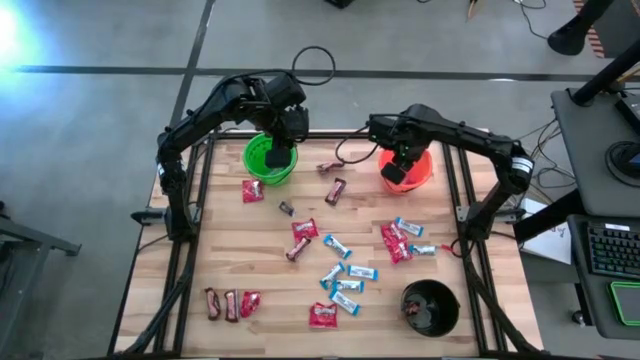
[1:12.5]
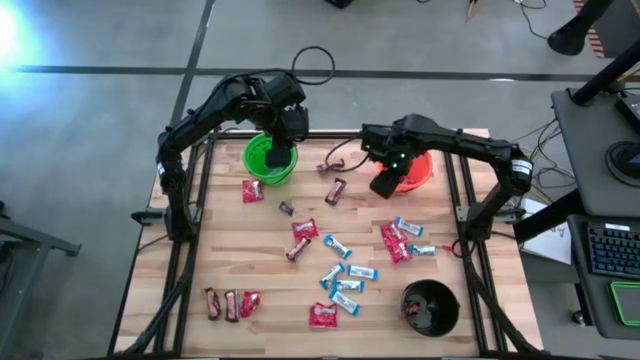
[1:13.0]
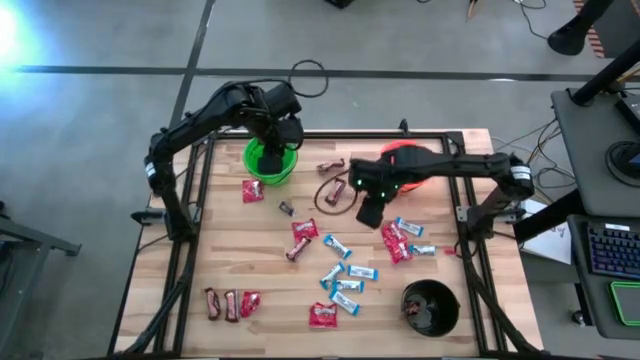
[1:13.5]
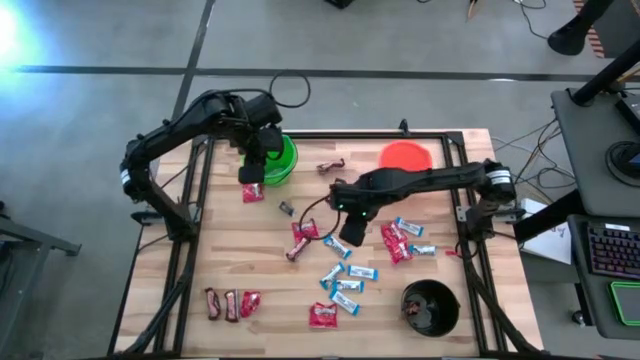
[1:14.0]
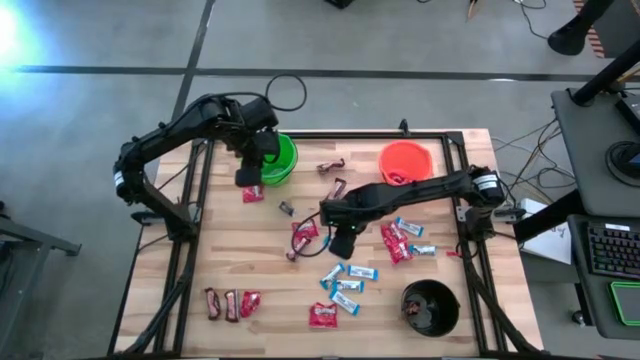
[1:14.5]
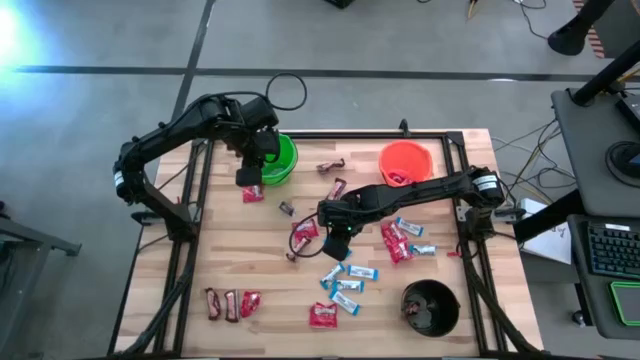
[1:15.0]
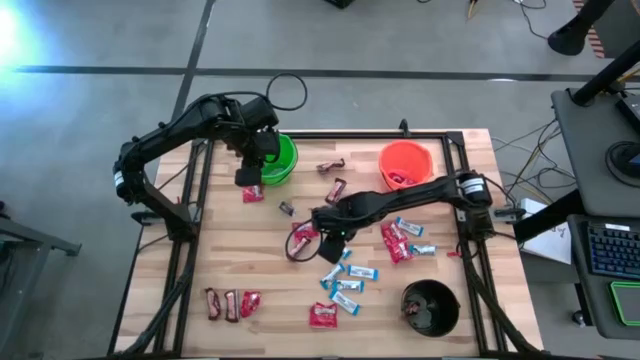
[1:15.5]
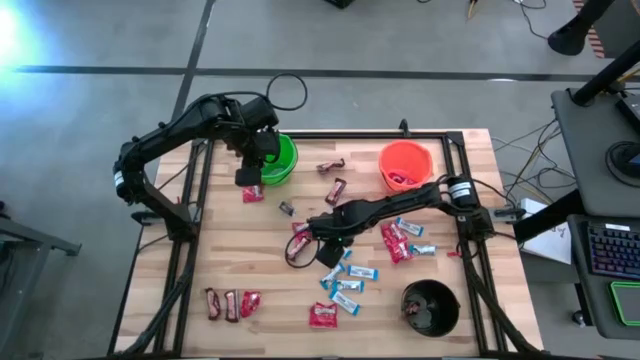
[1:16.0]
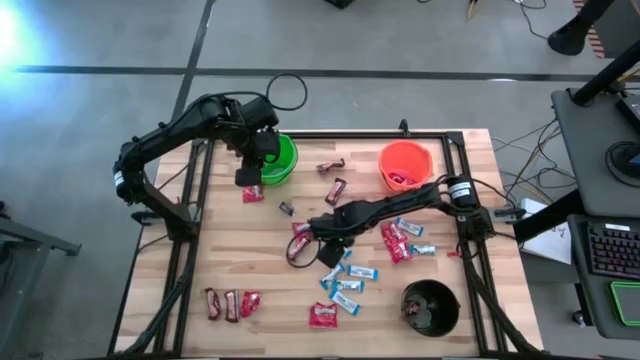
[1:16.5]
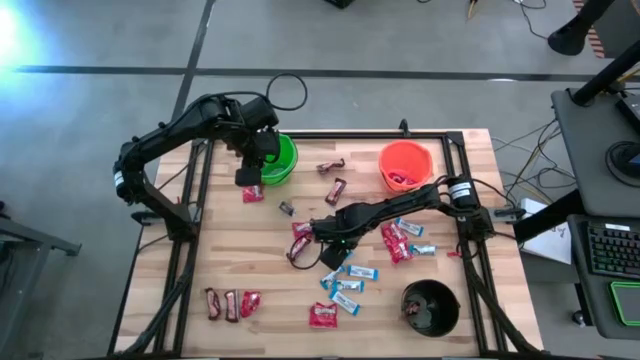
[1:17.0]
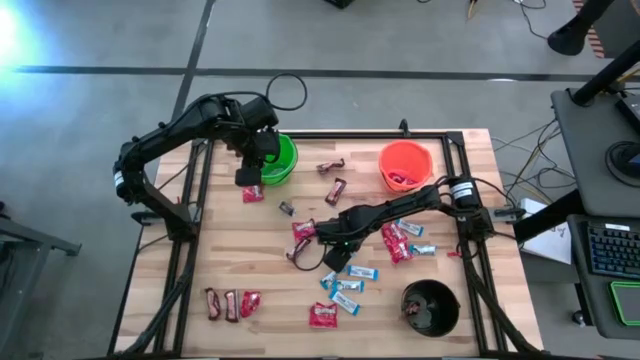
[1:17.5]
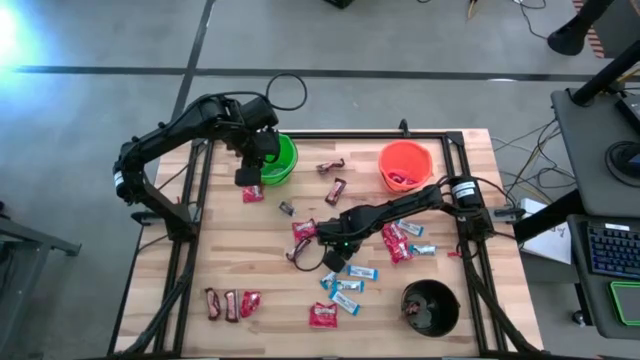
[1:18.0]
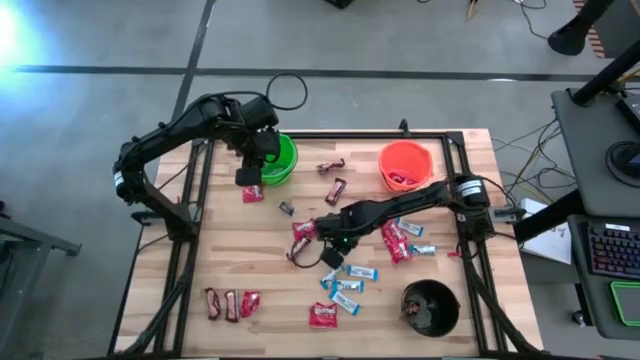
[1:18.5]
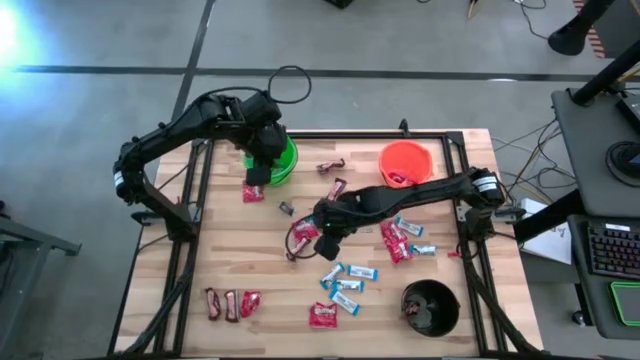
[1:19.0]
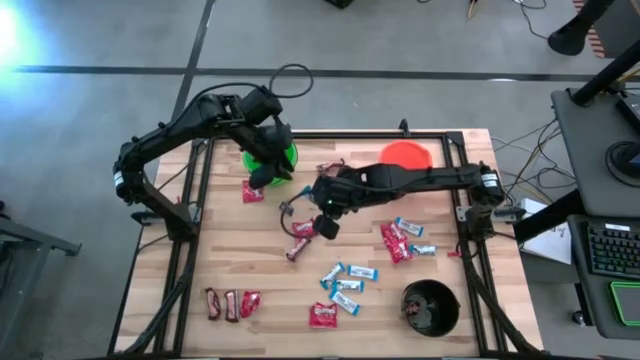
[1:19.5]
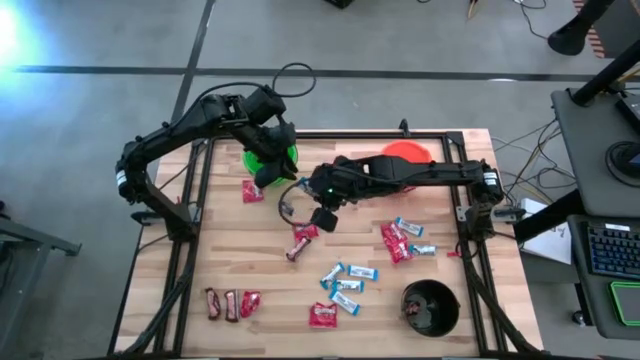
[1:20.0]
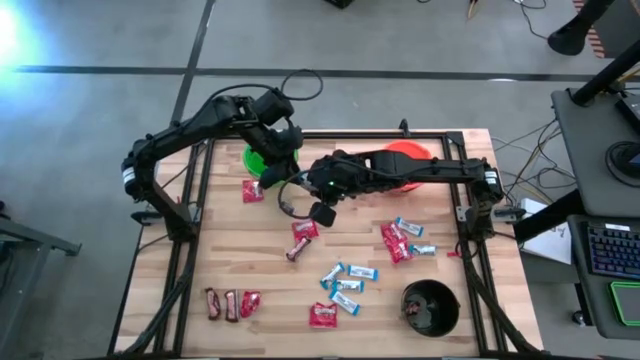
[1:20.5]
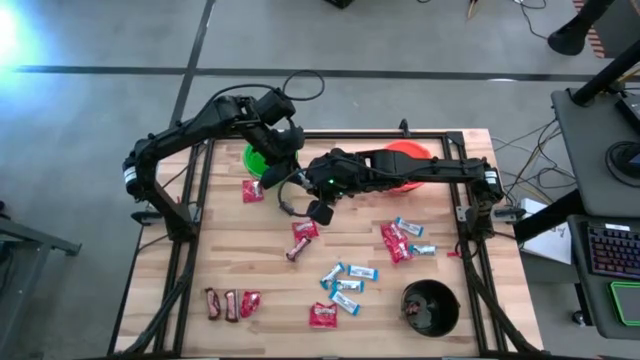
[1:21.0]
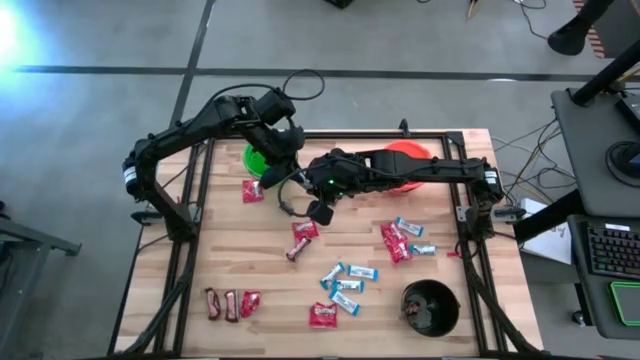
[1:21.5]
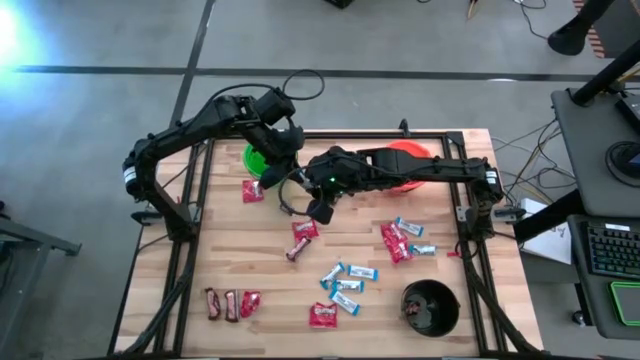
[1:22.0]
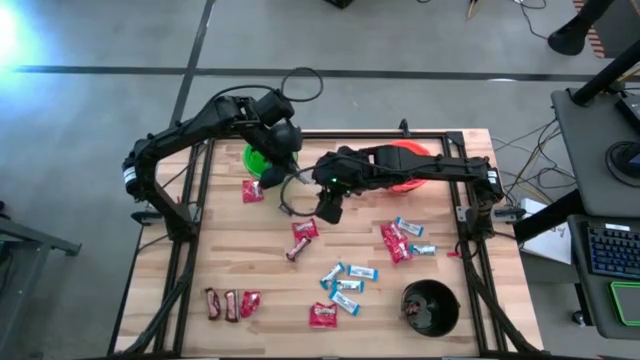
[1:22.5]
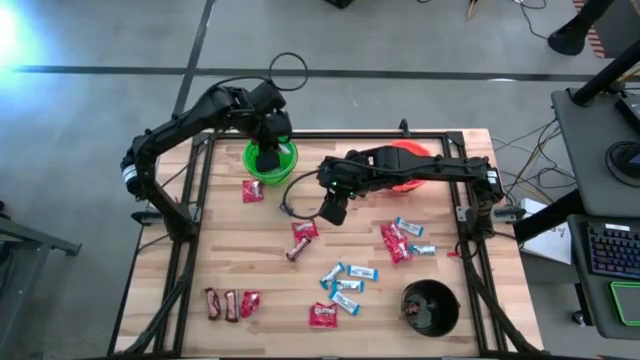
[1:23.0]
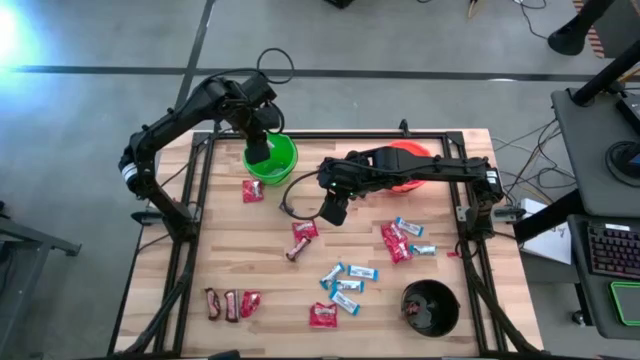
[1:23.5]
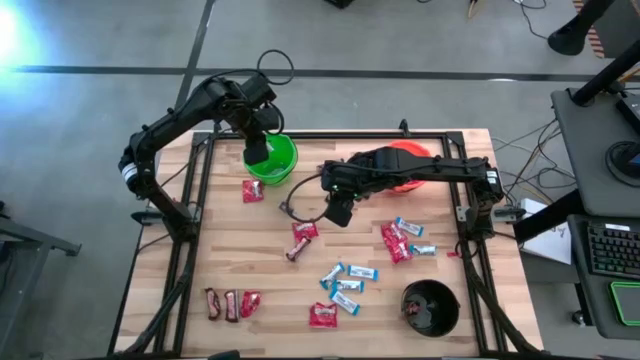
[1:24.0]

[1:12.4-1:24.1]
Task: Sort candy
Put the white candy into the green bucket

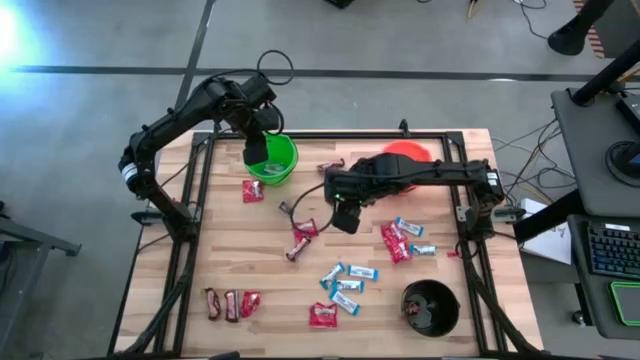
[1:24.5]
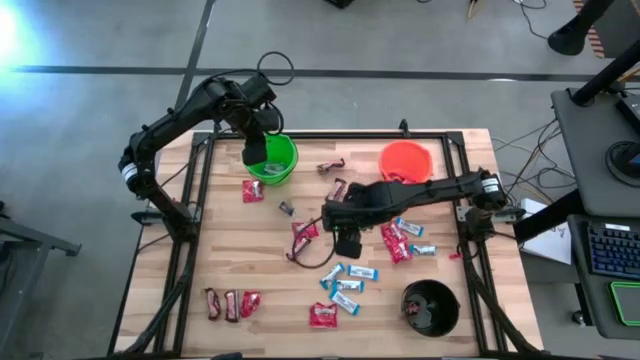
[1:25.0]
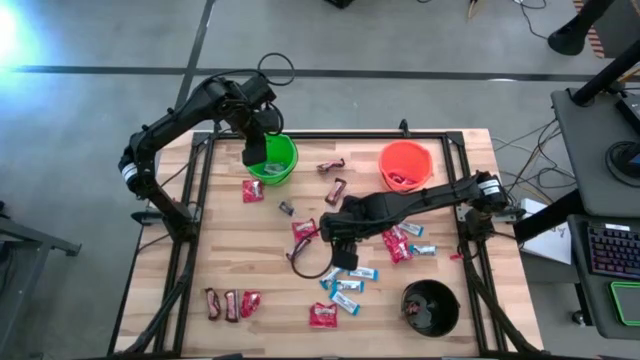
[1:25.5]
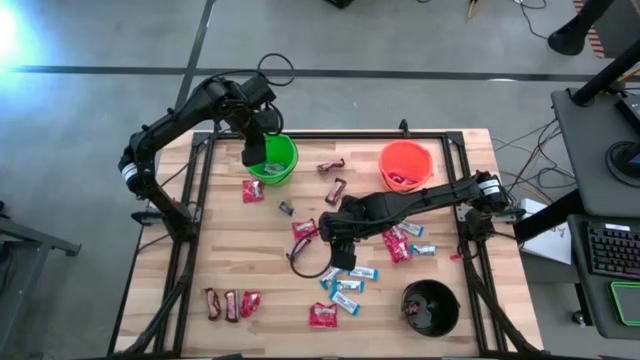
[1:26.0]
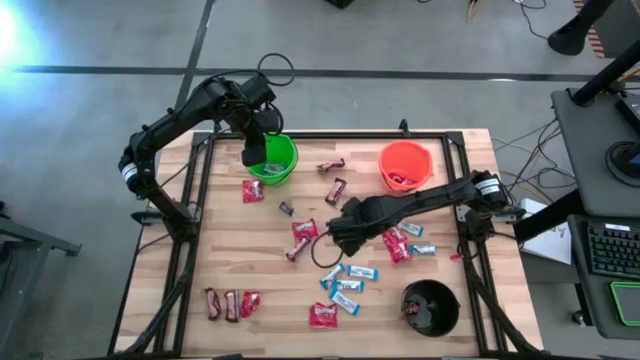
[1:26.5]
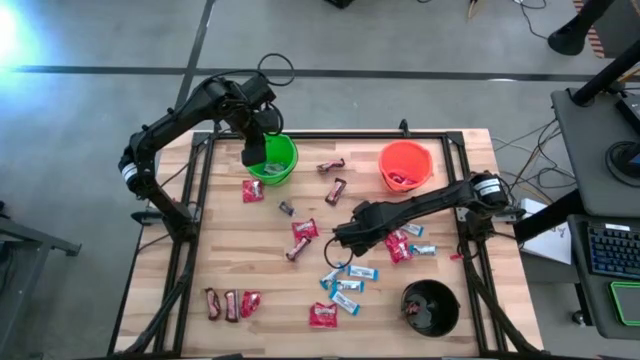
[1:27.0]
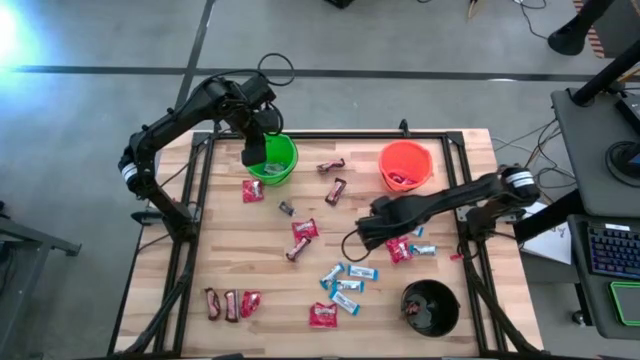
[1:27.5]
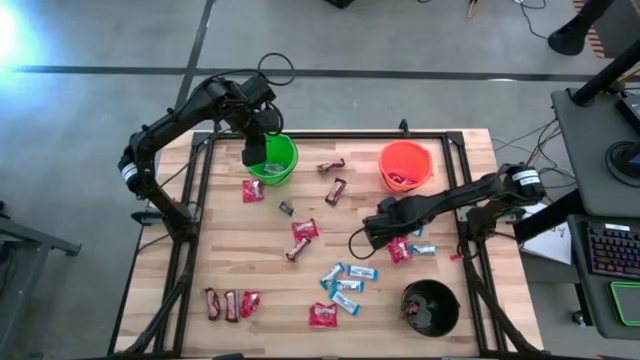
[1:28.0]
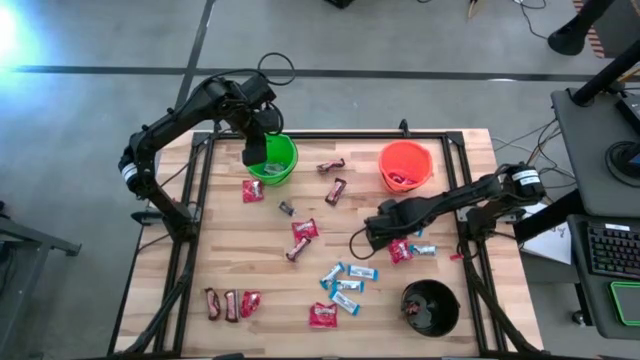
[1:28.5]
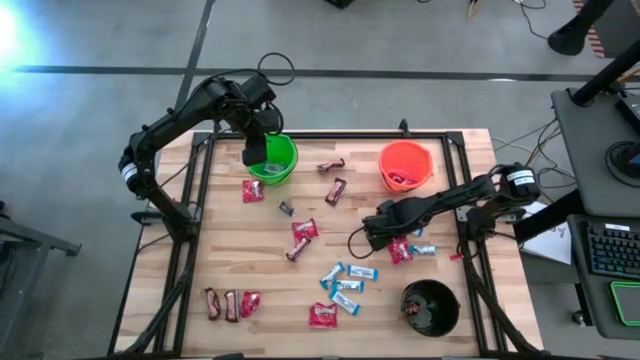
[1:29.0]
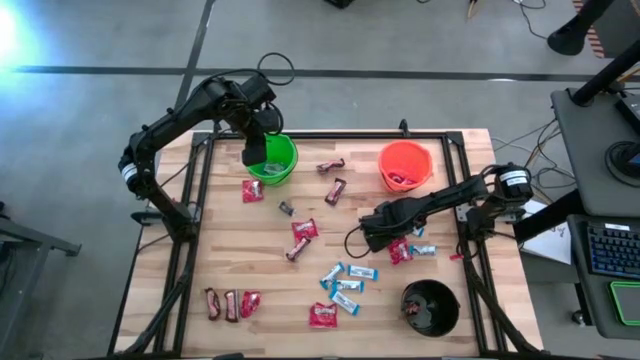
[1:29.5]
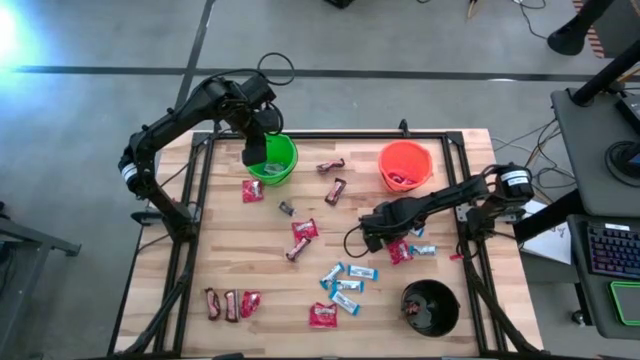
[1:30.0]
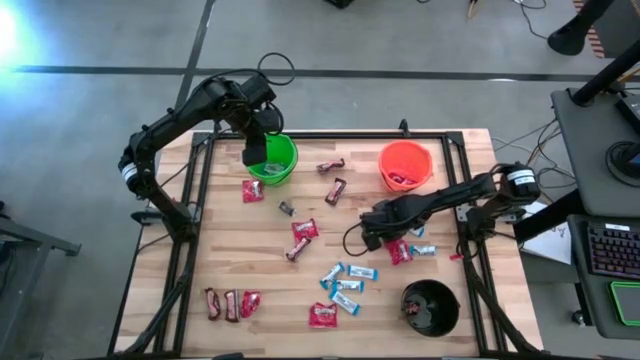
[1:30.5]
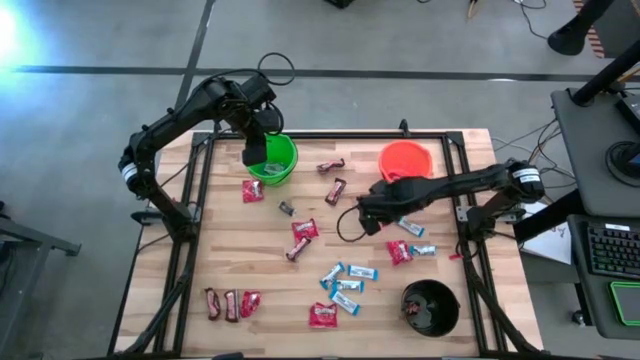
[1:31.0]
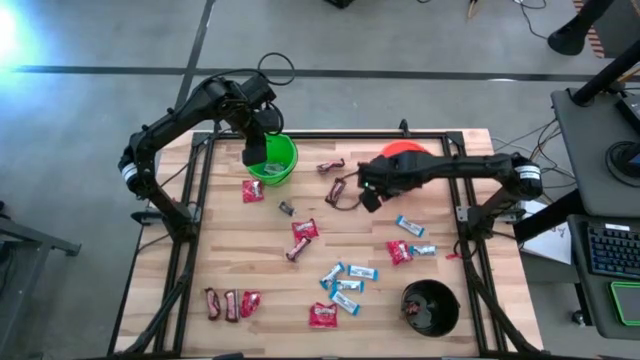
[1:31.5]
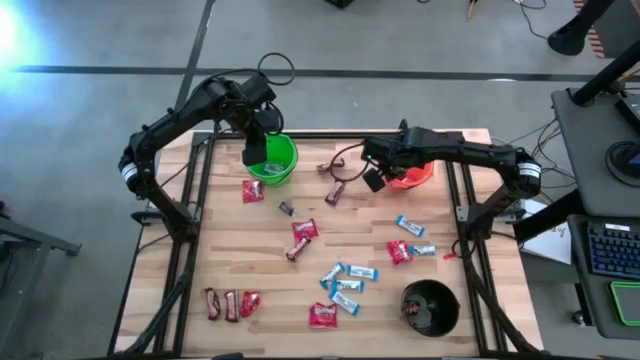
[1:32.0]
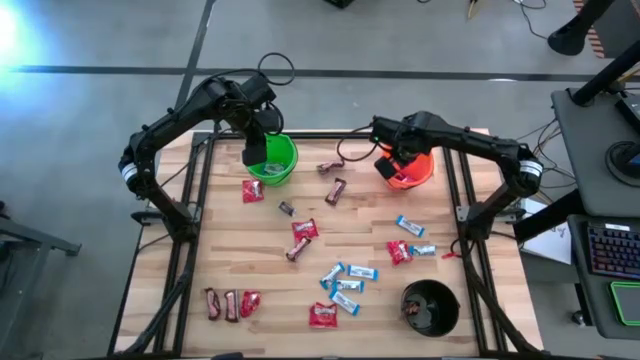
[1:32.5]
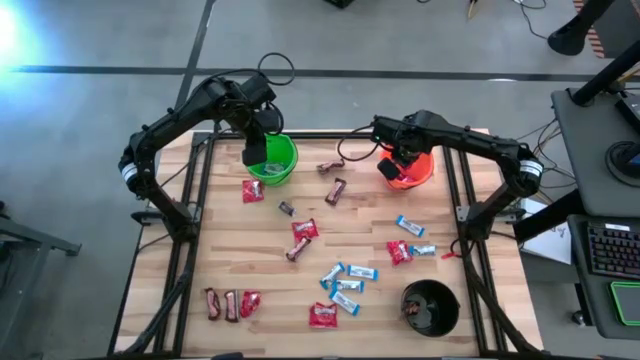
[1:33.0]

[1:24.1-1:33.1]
Put the red candy into the orange bucket
